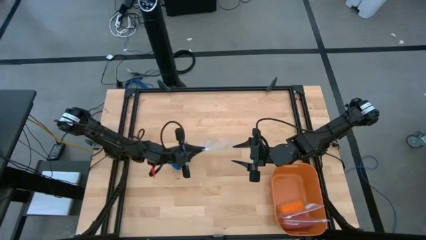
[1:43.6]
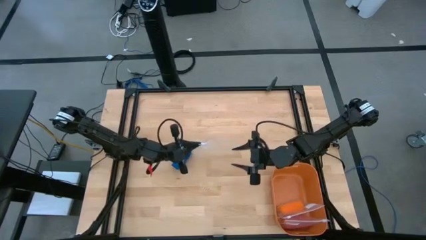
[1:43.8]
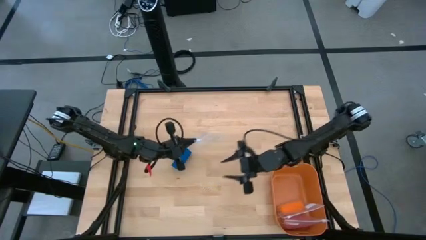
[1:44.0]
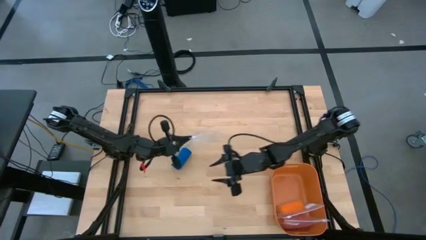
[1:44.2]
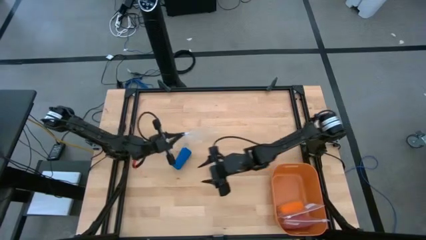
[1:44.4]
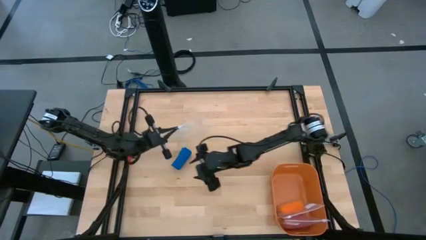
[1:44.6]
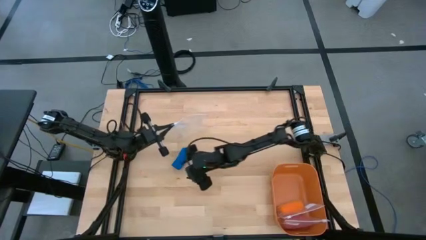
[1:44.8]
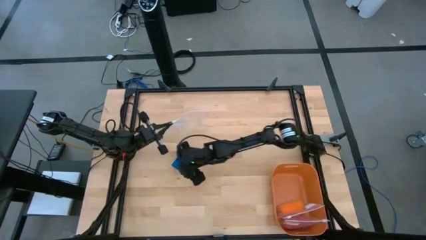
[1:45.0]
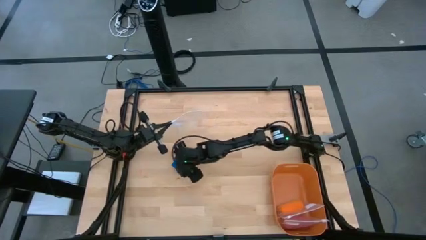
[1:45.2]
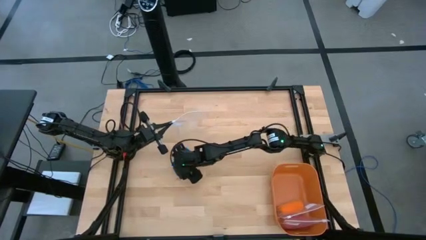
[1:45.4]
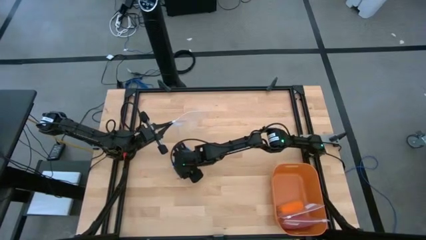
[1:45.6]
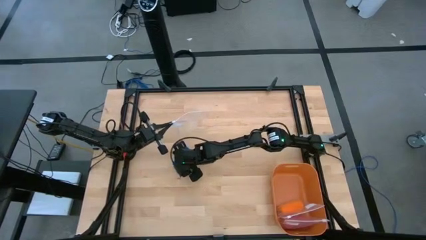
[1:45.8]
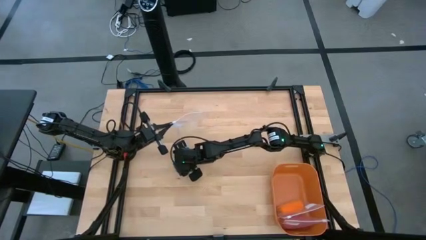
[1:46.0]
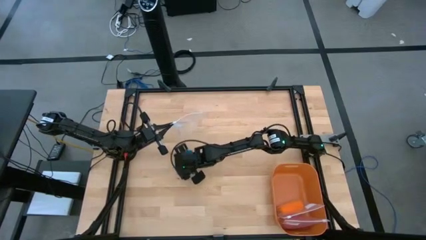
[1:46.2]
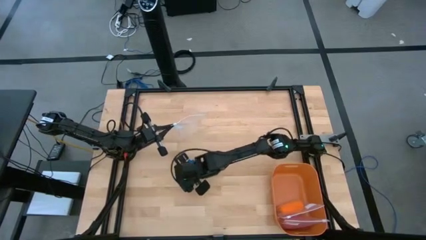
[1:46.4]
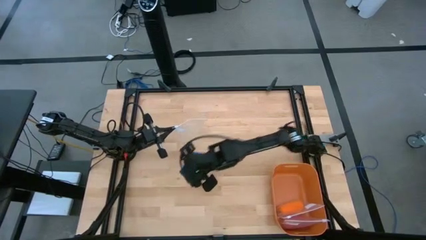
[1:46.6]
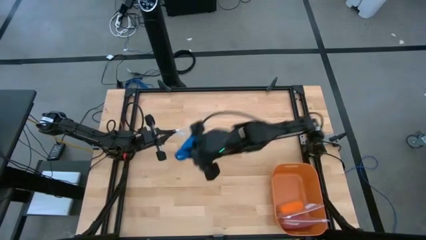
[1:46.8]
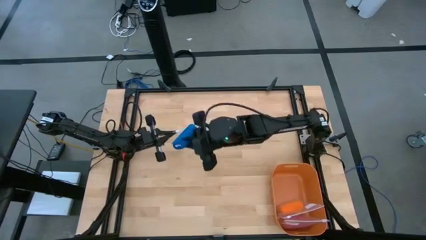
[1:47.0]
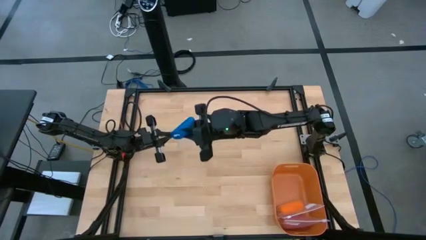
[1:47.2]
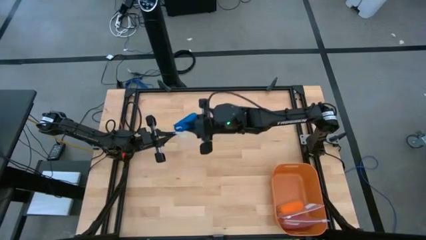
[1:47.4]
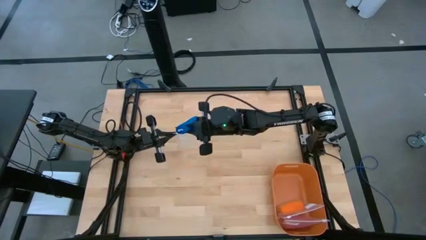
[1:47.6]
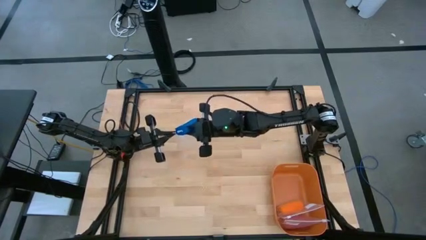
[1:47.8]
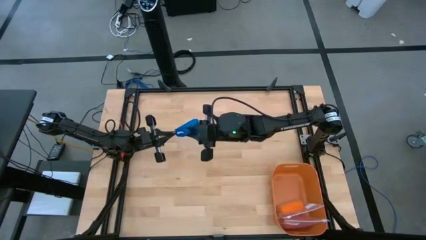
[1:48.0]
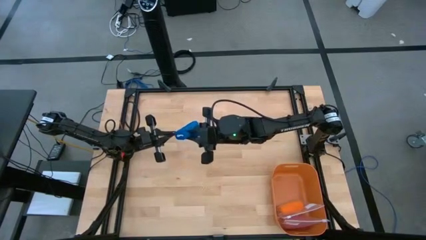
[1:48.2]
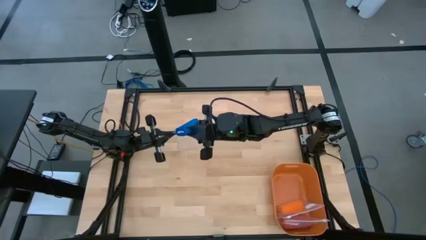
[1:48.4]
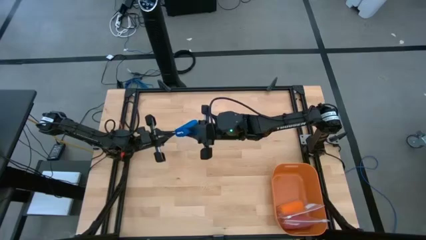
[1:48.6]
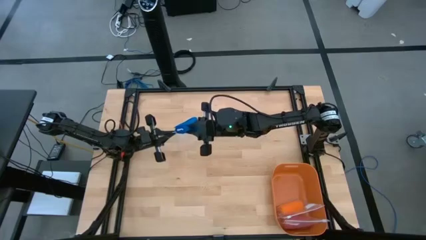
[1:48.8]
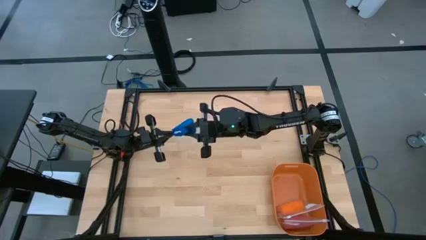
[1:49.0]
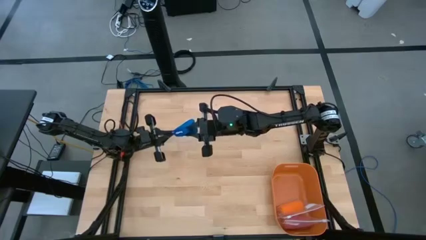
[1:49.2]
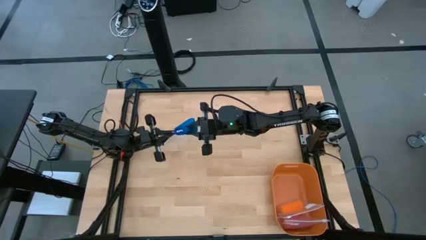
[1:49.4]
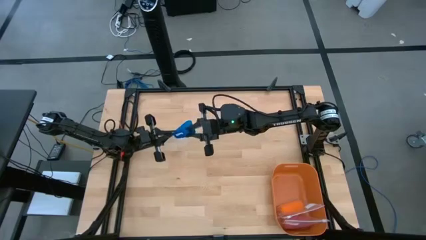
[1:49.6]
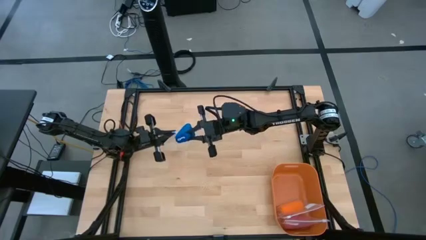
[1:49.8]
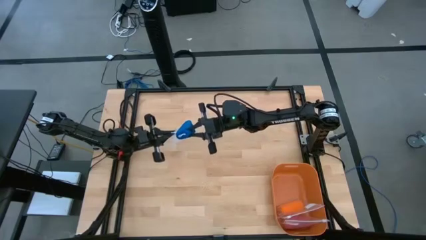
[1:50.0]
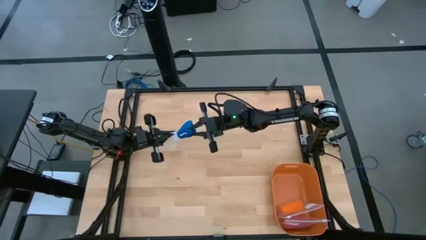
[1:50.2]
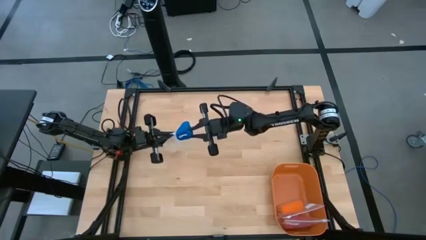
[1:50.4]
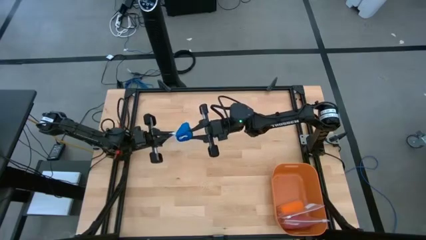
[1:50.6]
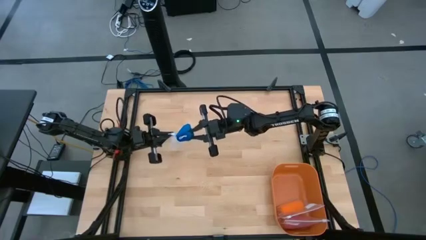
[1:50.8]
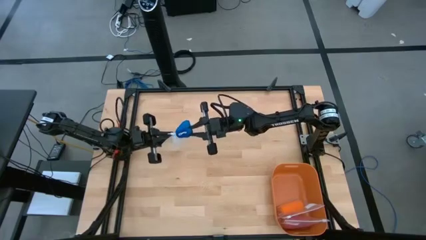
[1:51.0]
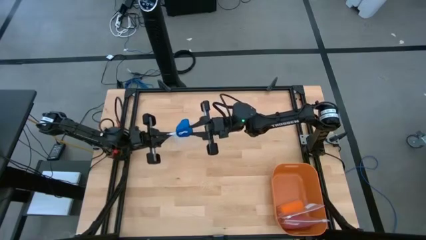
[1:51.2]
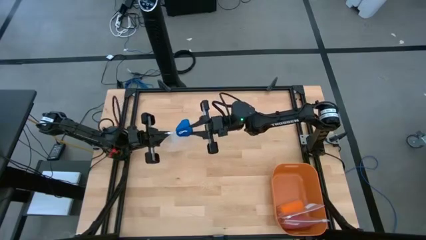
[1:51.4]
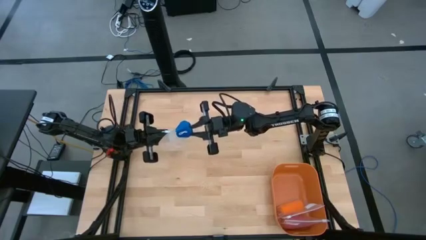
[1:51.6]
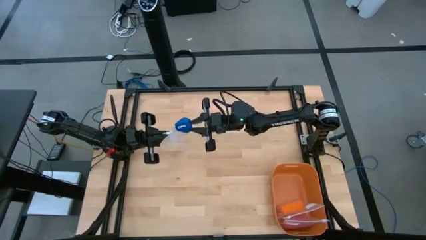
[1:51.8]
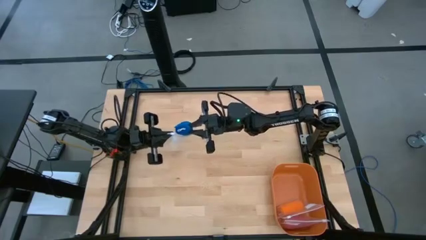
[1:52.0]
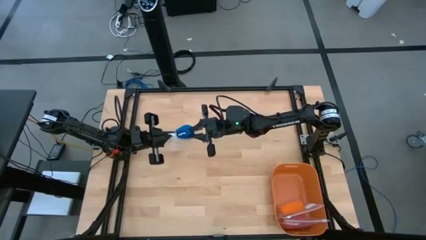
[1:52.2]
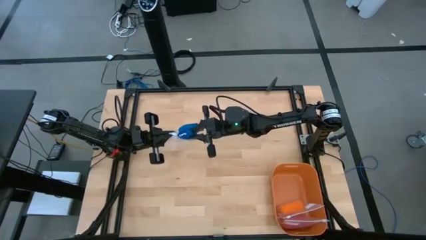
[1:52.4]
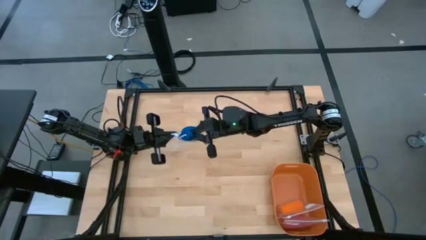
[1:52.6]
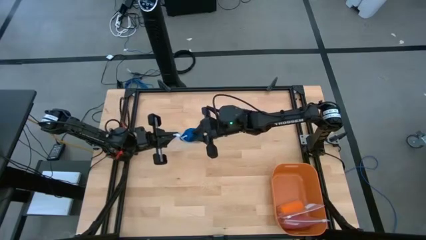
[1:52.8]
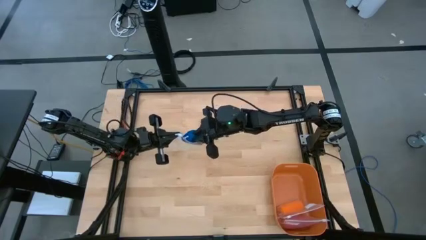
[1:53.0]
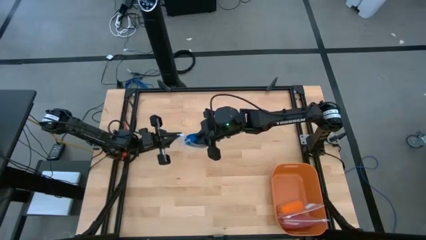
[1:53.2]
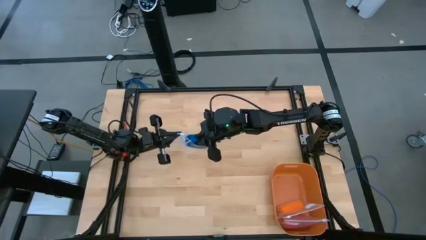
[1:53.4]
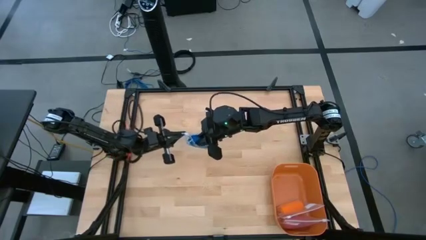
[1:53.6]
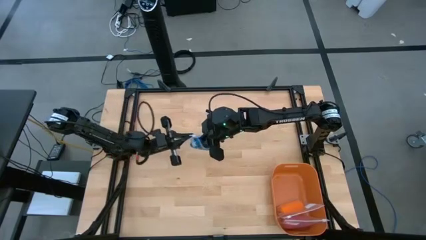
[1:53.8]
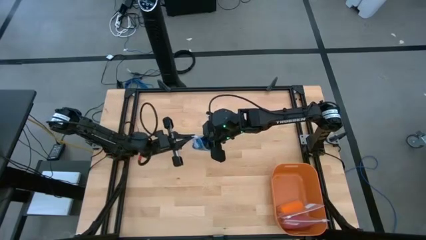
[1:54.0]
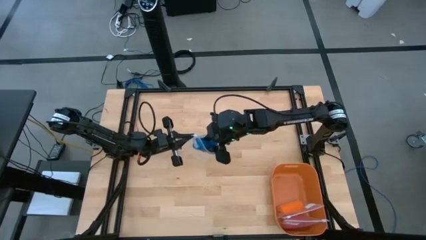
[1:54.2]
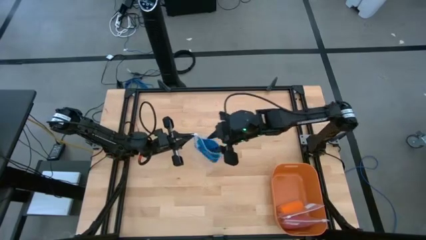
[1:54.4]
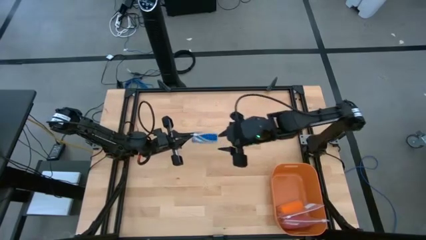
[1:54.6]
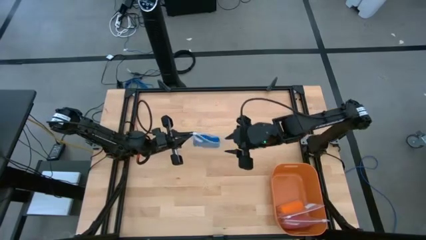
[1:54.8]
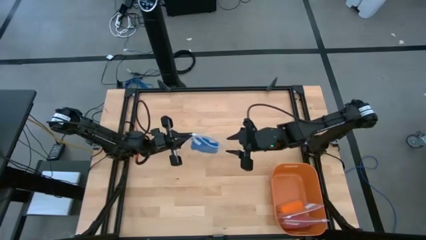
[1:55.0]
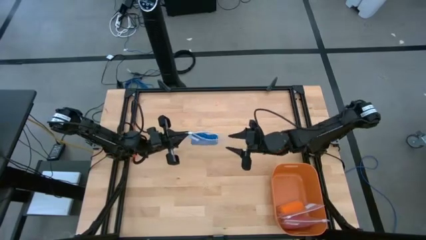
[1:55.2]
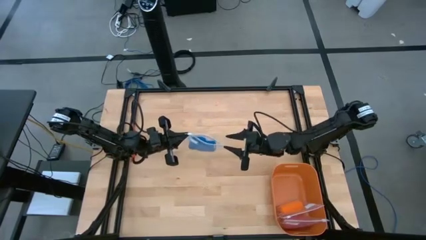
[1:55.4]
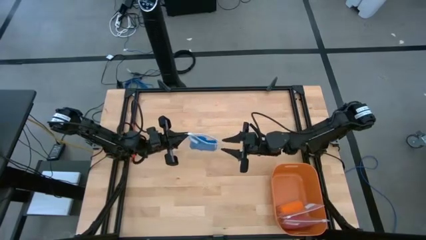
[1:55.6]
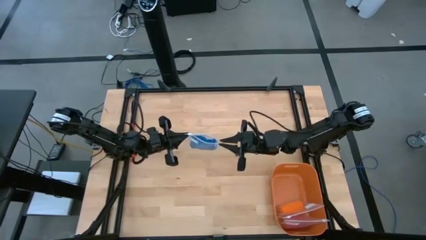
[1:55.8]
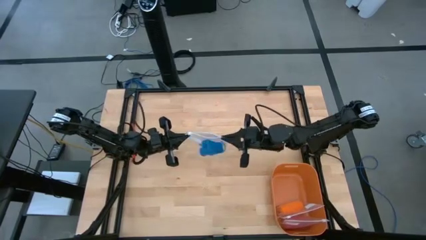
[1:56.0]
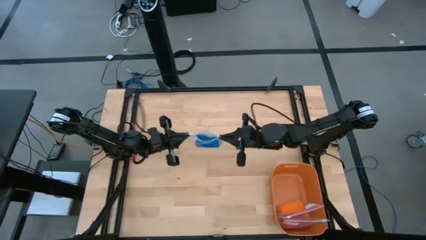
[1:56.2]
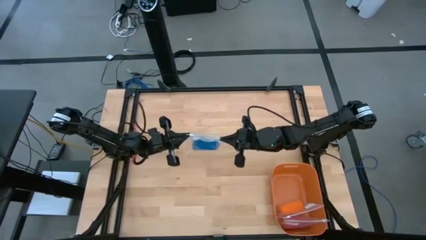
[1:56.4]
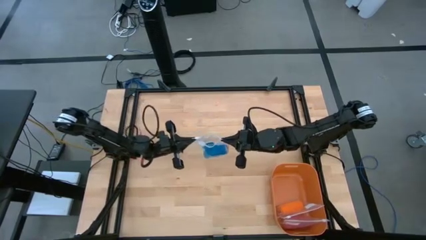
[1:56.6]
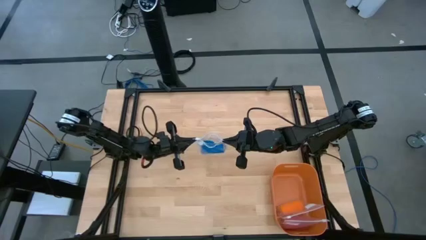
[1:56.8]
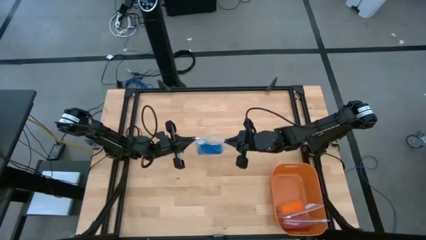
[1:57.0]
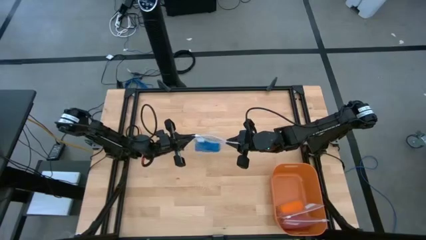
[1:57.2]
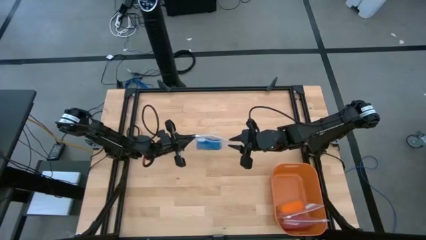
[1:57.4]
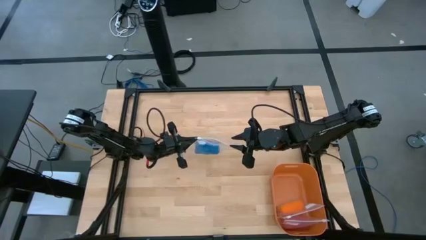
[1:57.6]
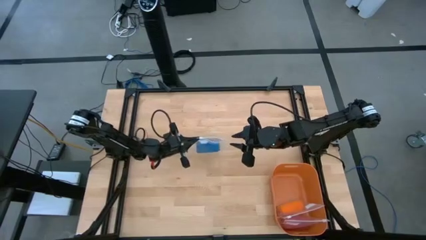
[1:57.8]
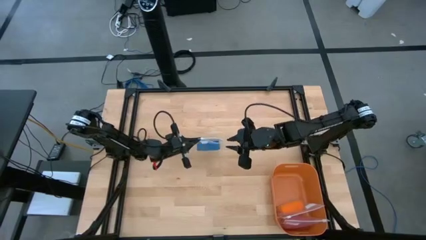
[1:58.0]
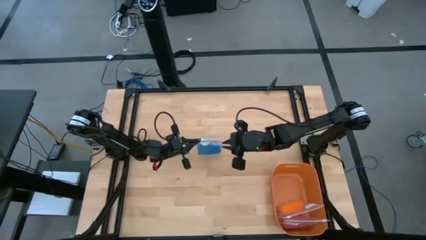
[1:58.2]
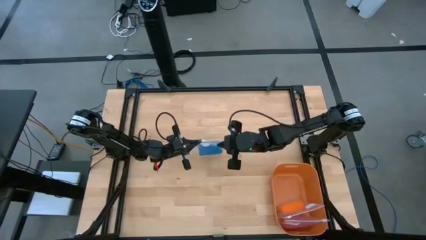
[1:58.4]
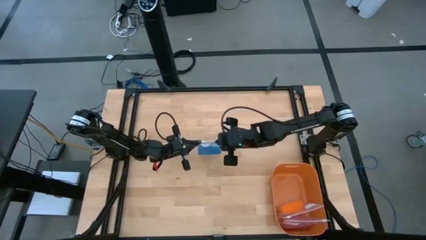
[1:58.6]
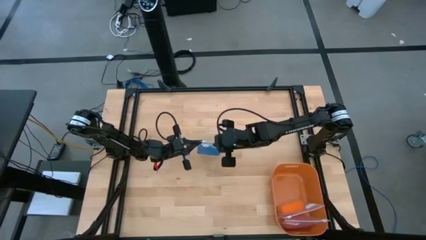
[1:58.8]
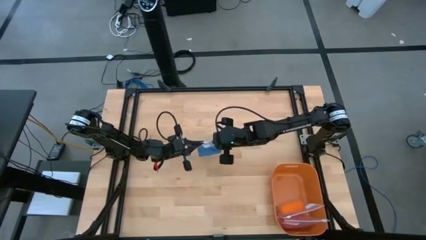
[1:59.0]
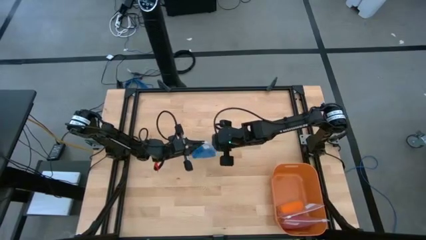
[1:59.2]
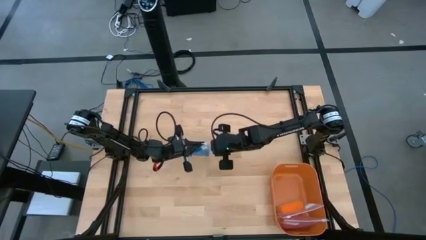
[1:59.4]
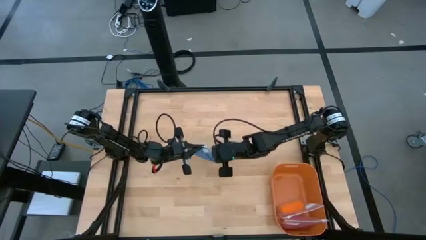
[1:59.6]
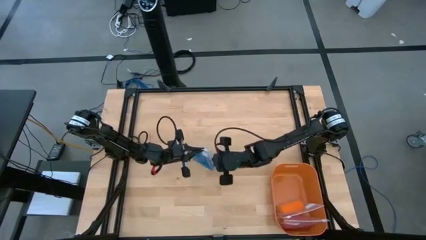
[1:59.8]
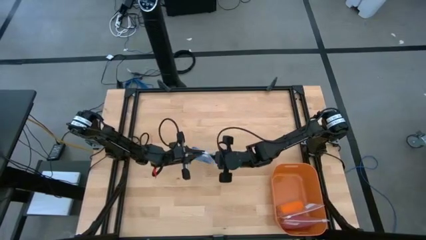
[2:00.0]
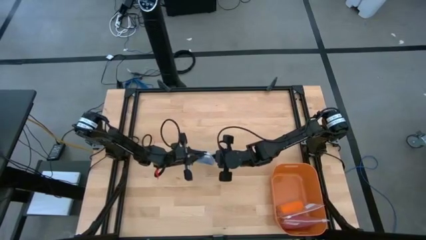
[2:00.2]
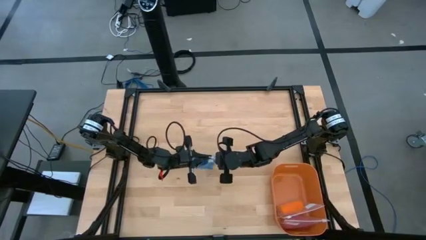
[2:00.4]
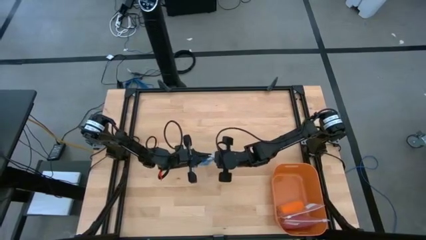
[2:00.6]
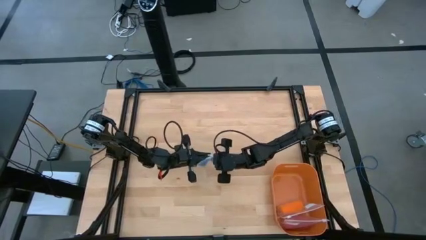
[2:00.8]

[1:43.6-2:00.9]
Task: Roll bandage
Put the blue bandage into the transparent zip lock bag
